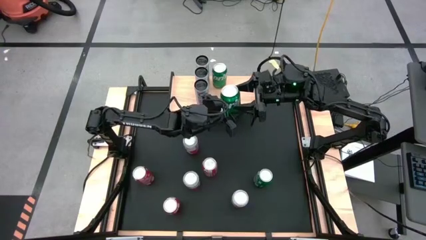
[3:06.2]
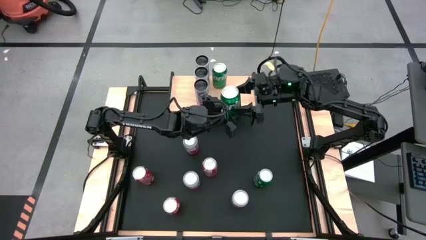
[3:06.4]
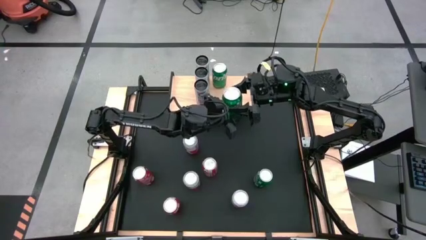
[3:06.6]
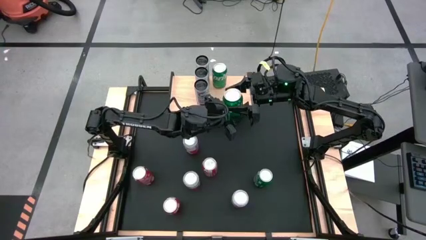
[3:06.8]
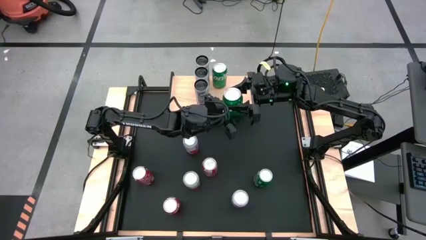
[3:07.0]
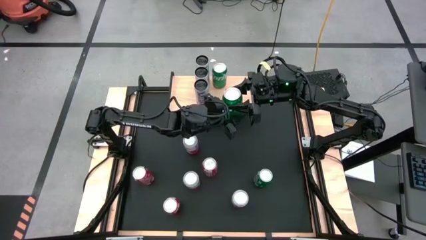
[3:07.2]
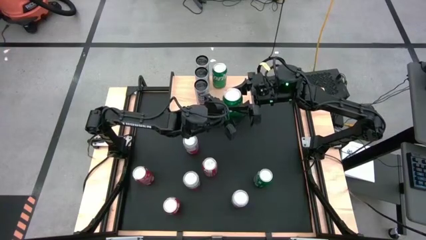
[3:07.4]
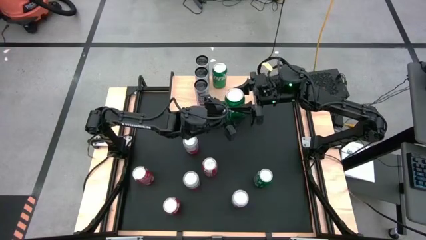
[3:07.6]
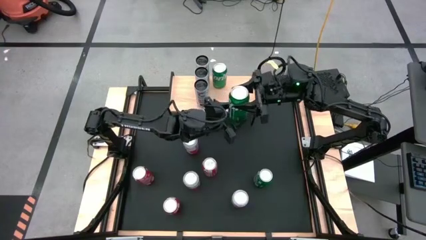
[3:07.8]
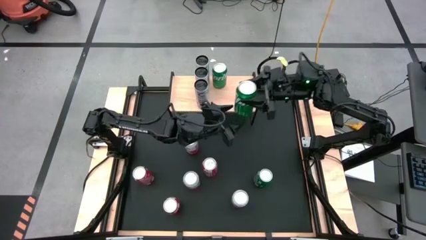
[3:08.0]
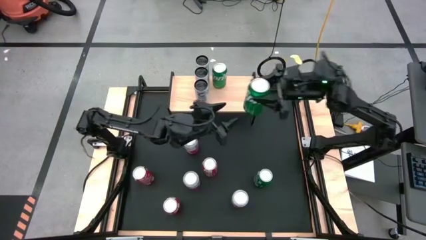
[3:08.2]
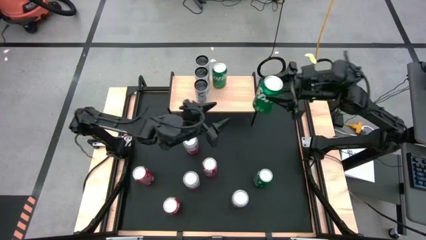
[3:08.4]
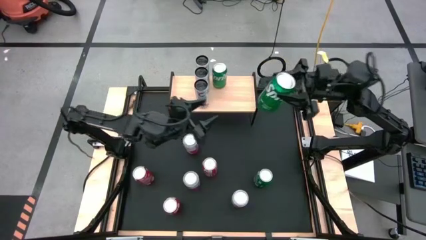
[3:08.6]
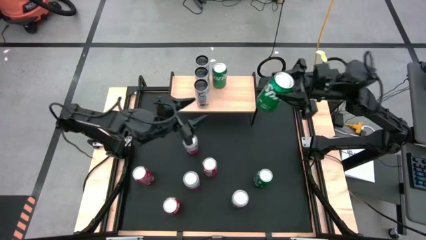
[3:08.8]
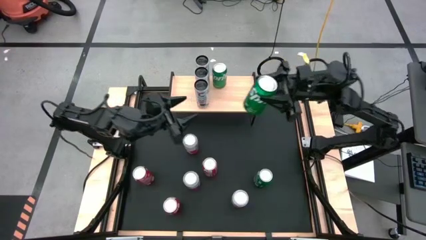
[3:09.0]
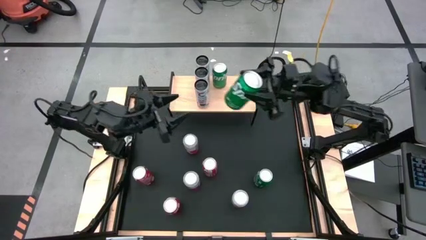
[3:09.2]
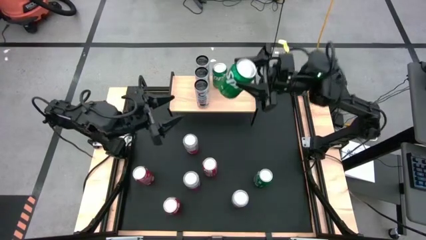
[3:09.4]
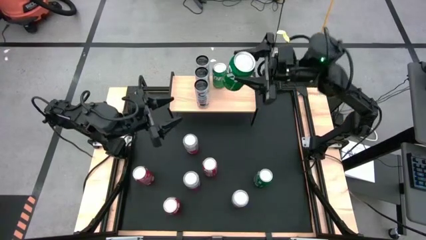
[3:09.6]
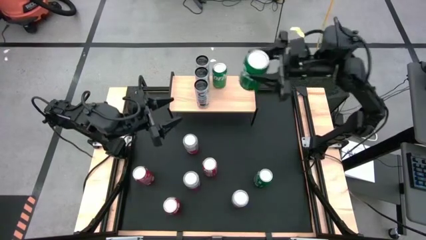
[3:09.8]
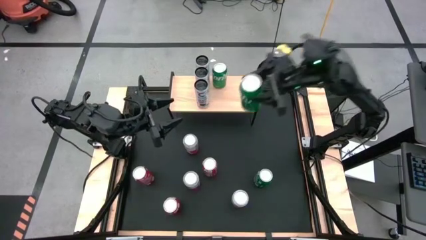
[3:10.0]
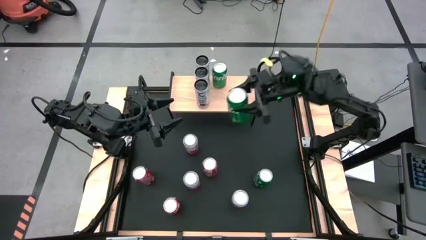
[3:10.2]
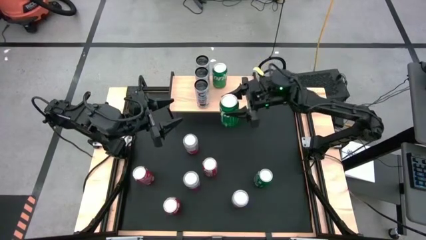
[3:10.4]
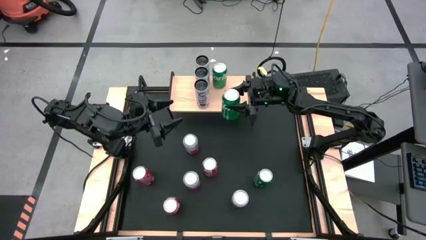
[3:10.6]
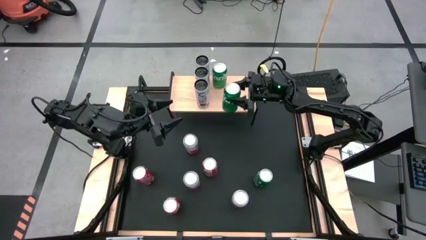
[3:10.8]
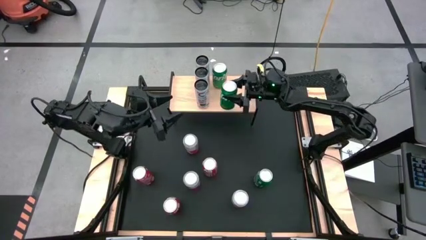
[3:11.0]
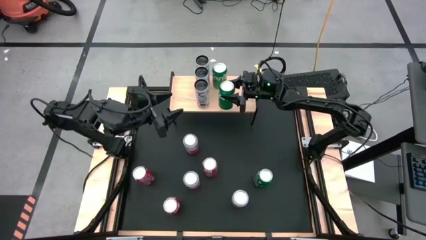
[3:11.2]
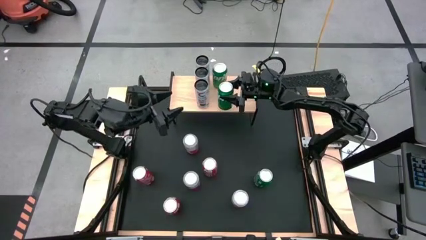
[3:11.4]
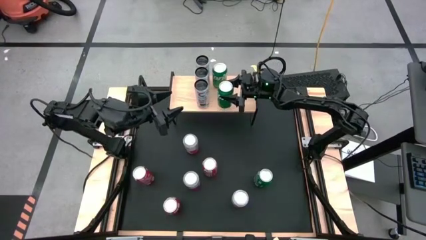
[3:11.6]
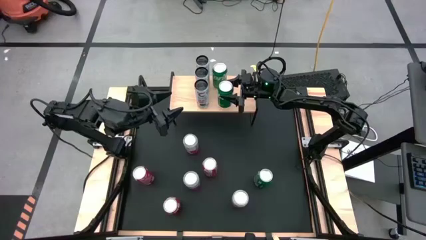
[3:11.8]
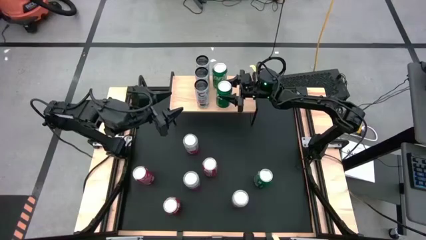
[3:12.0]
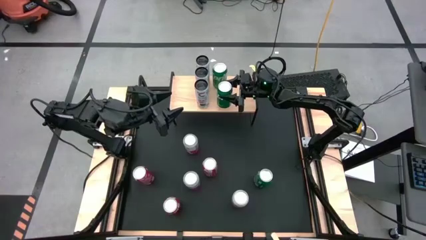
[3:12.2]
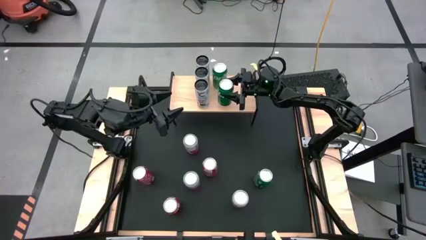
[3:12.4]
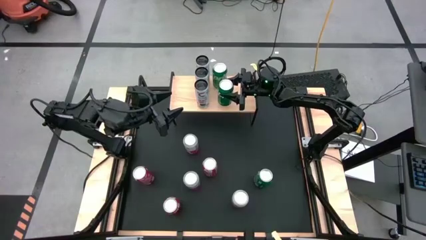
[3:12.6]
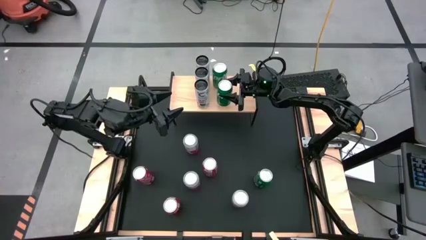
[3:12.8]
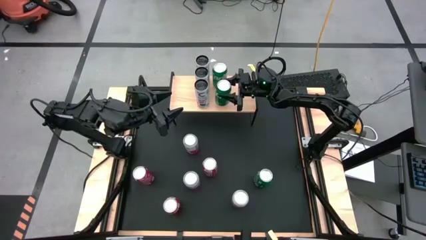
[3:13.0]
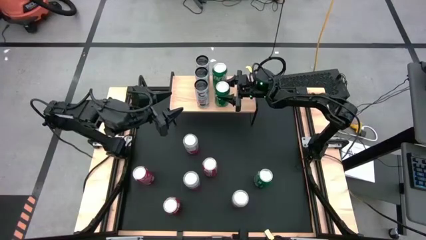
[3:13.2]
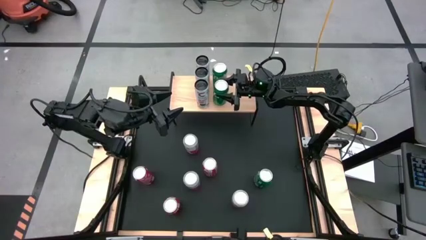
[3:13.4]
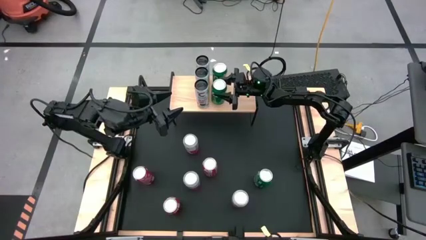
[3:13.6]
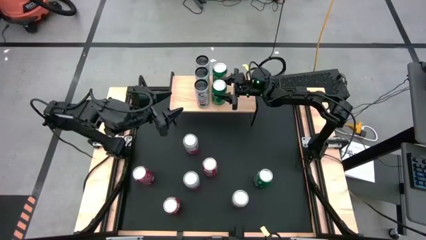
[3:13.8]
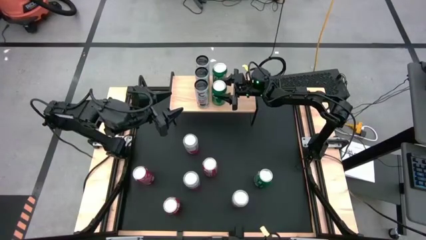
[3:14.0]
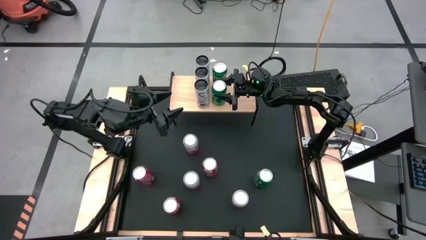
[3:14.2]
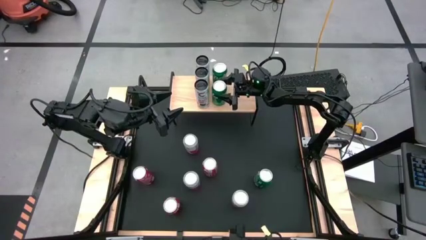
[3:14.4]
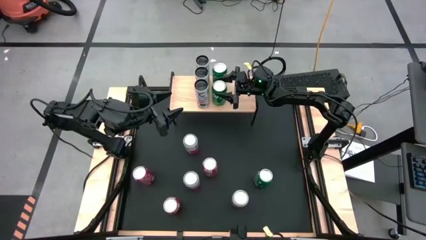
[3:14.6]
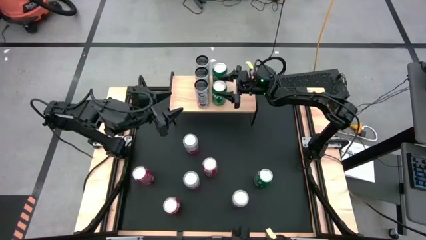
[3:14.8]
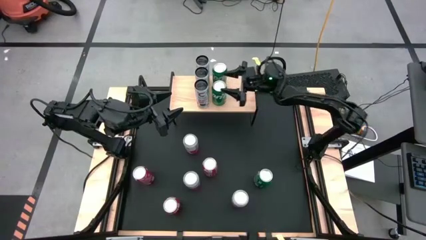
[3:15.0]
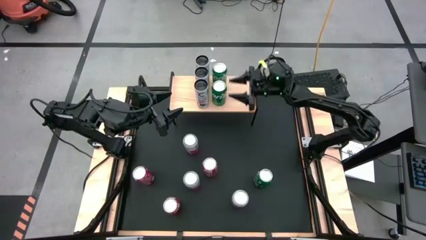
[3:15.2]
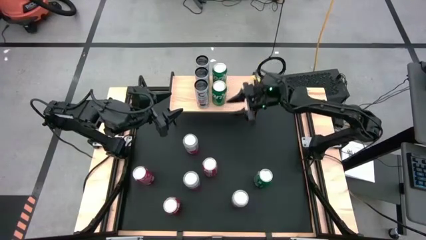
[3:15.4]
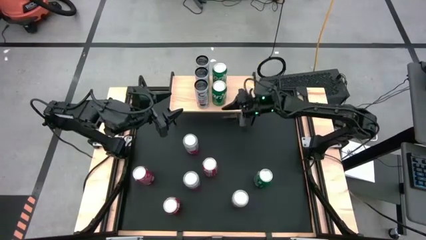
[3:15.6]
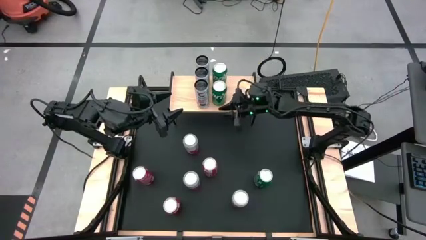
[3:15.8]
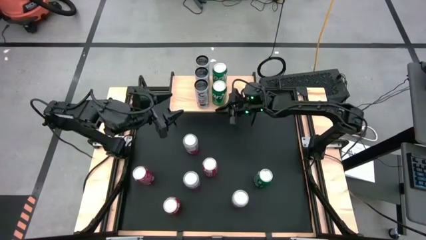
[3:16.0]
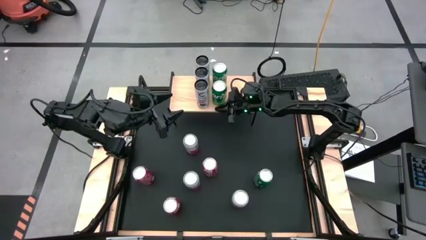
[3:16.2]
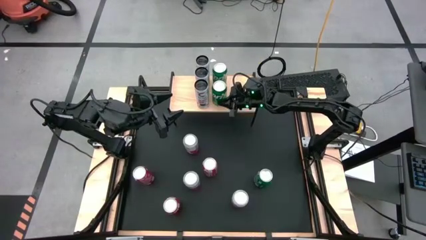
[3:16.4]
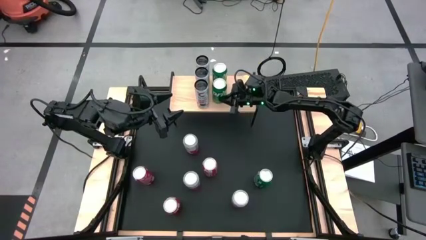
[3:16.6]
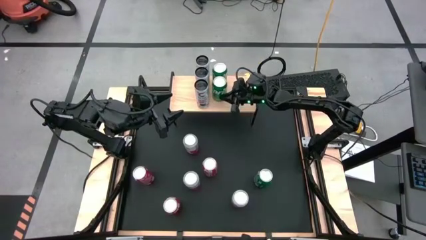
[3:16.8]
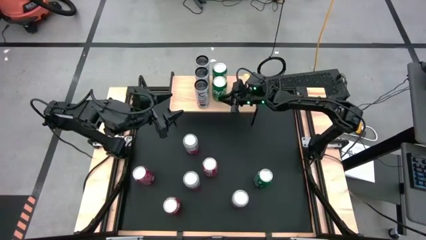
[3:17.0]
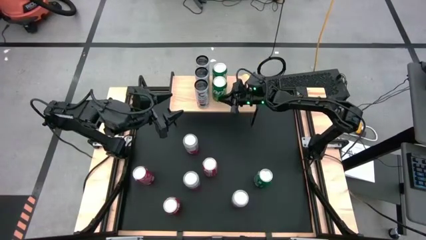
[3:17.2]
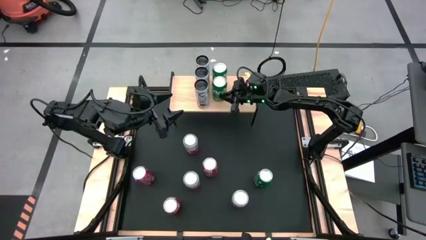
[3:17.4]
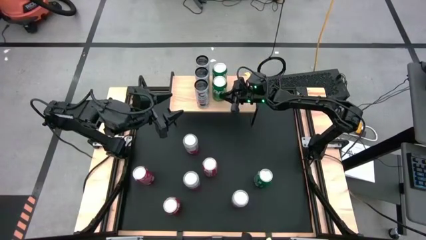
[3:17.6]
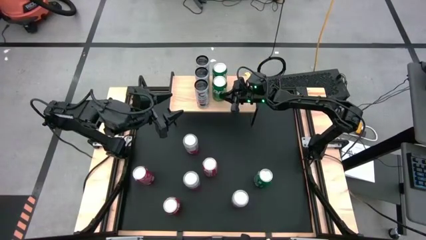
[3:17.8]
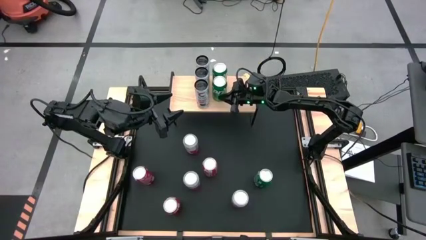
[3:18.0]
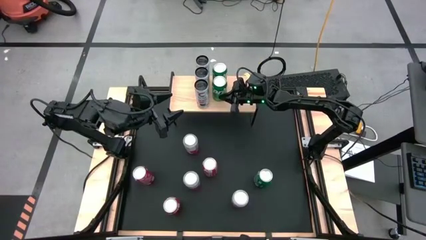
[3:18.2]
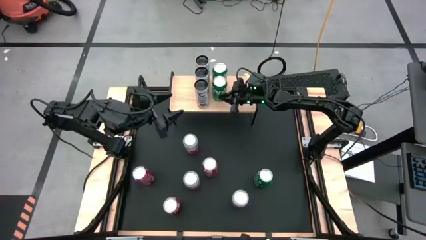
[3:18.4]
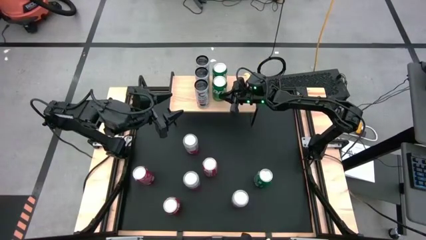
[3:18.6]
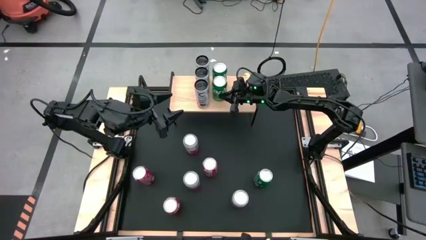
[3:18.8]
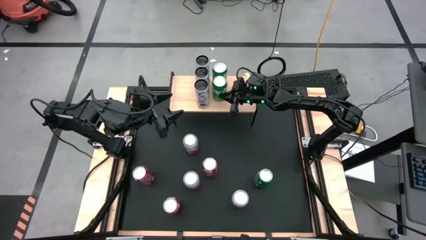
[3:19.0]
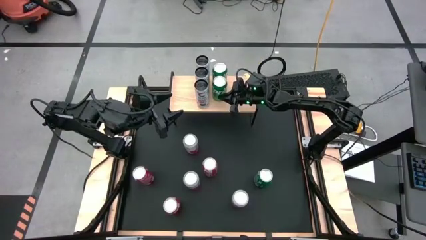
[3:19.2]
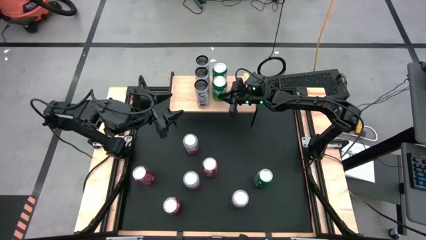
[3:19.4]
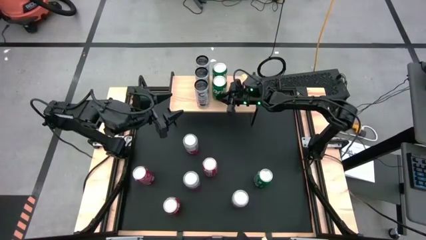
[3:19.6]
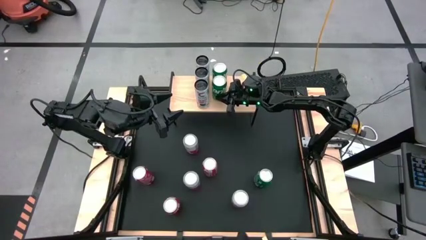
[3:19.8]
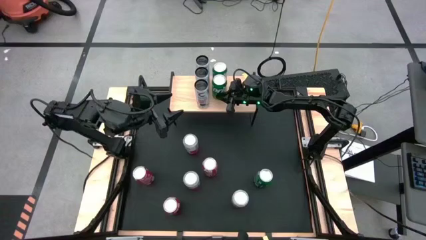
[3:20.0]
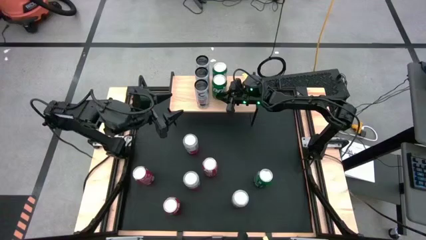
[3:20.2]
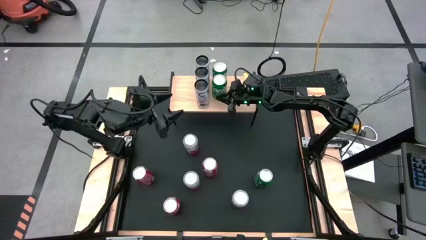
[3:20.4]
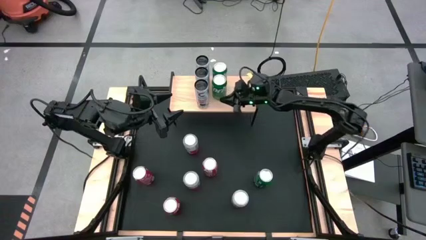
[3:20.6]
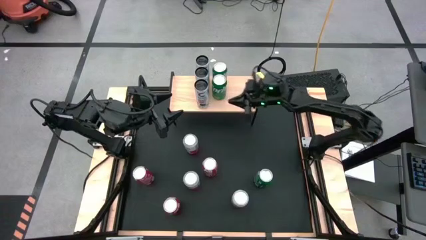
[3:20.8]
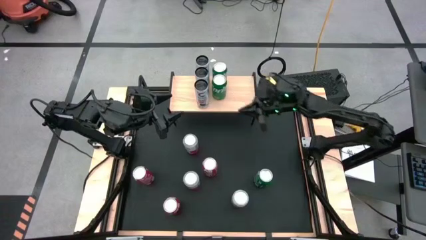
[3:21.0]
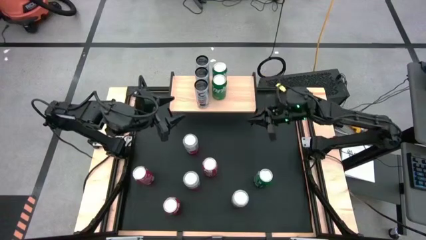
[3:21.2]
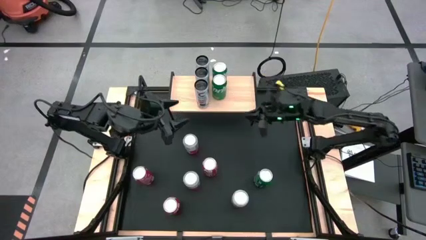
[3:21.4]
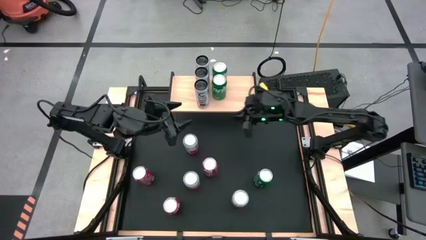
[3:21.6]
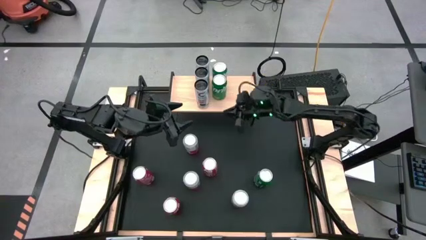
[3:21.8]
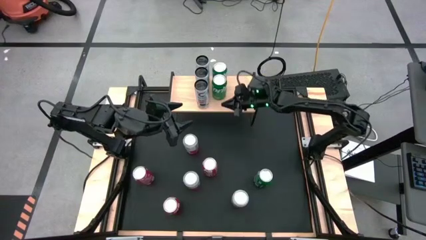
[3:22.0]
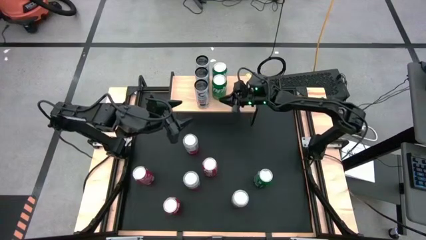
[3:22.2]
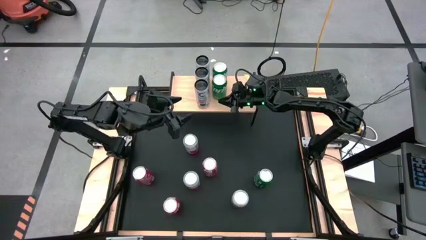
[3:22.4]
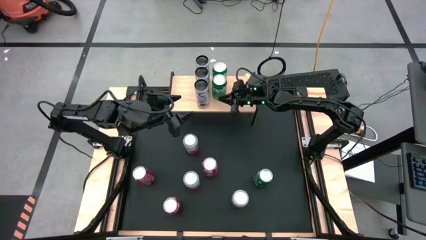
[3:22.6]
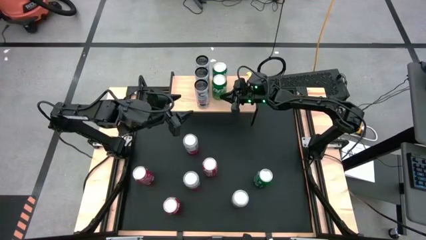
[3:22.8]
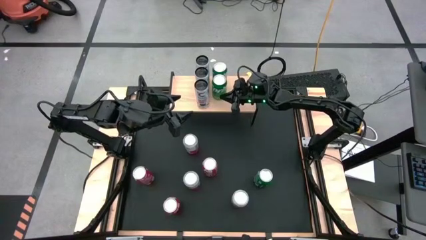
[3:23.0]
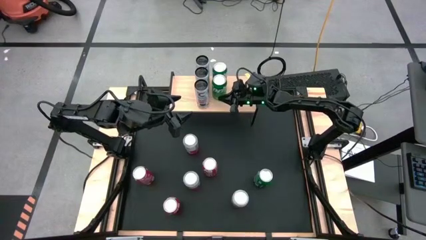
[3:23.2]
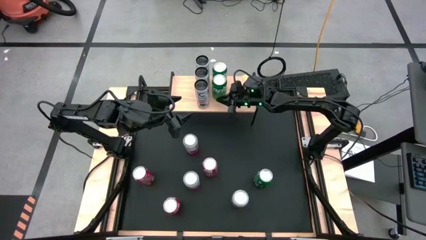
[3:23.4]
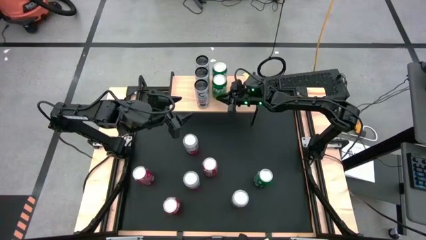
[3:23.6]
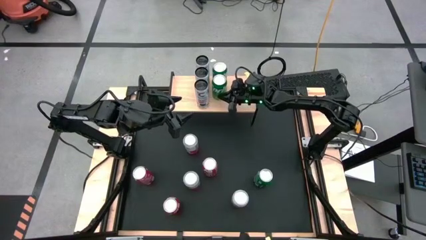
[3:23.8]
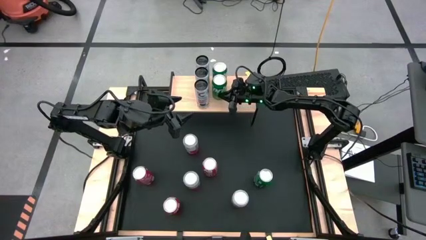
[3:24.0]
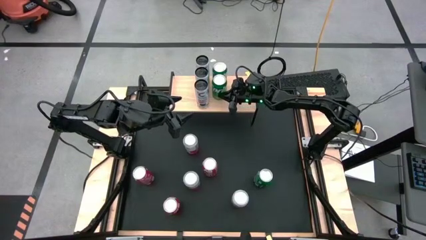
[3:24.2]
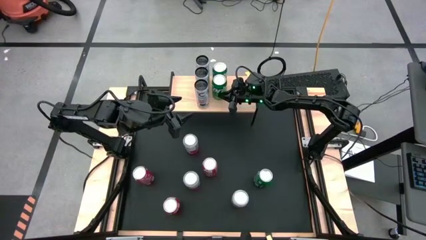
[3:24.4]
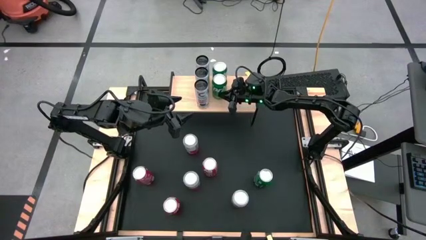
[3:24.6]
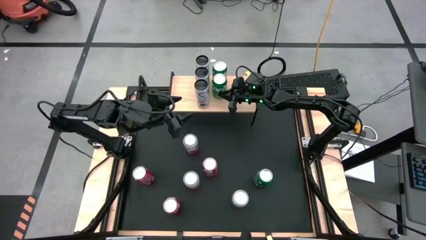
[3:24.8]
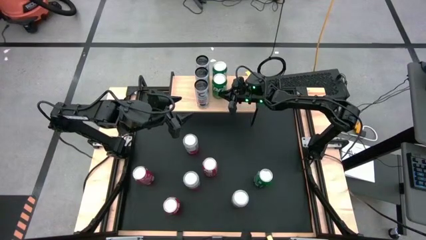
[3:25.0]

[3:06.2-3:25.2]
Task: Place canned beverage on shelf
Put the top green soda can aligned with the other green soda can on the shelf
